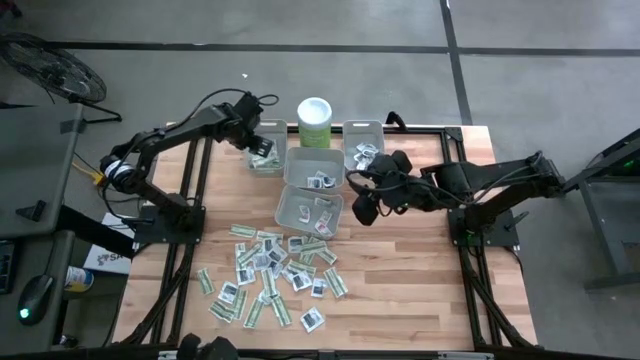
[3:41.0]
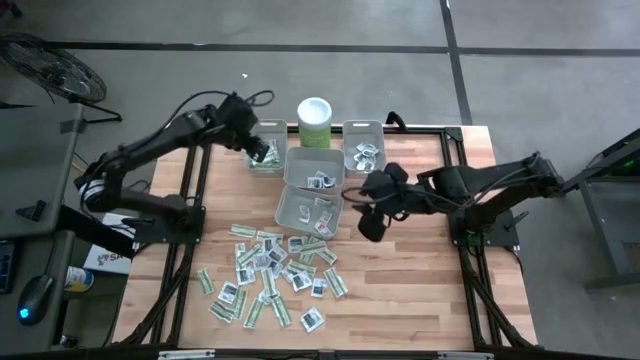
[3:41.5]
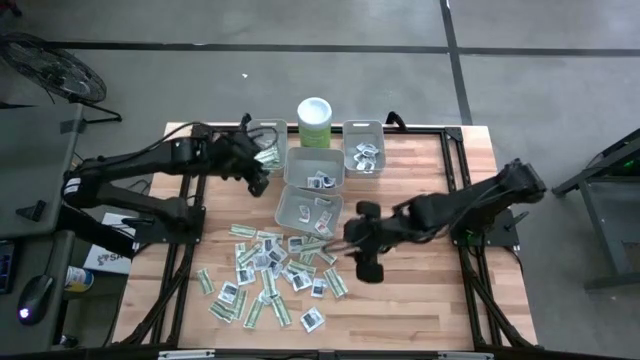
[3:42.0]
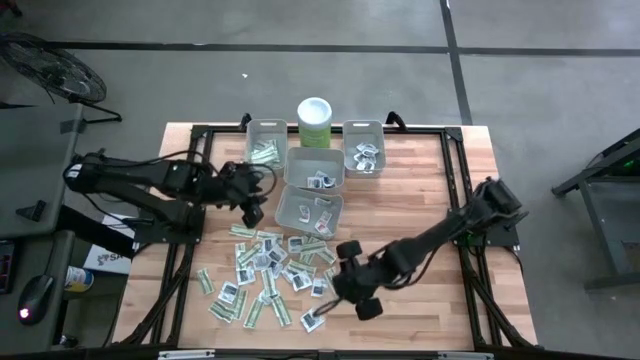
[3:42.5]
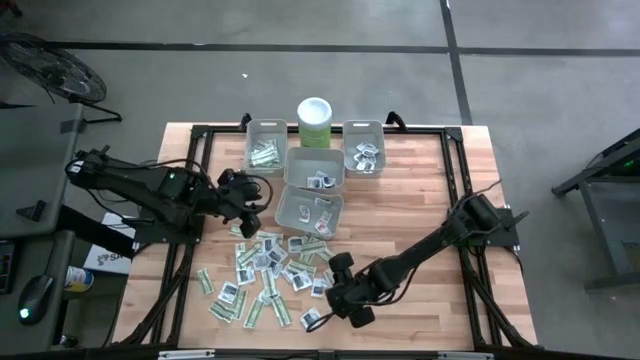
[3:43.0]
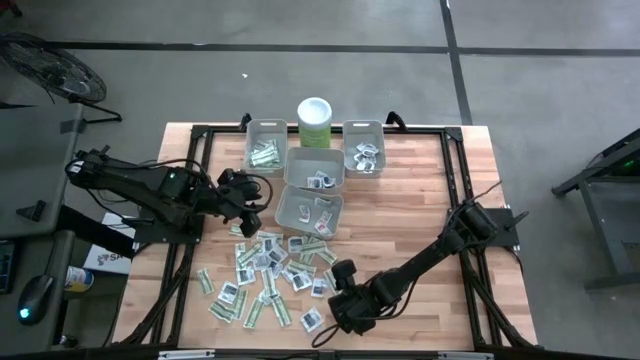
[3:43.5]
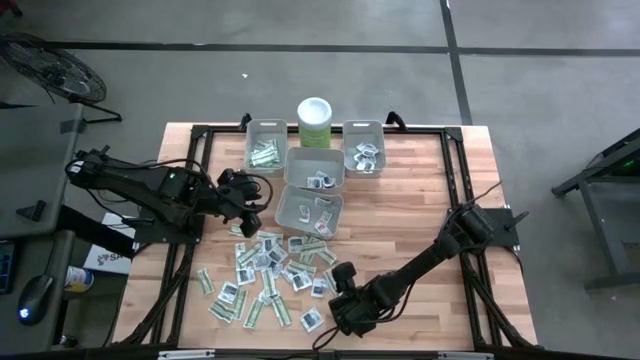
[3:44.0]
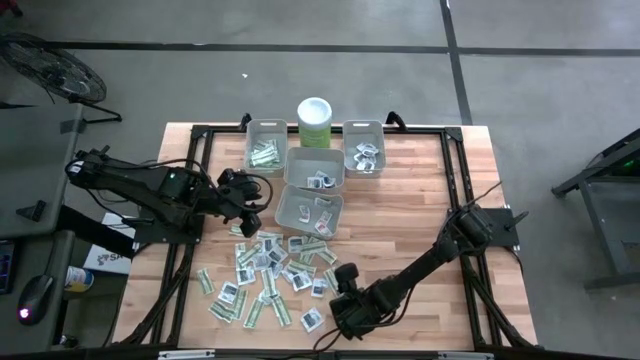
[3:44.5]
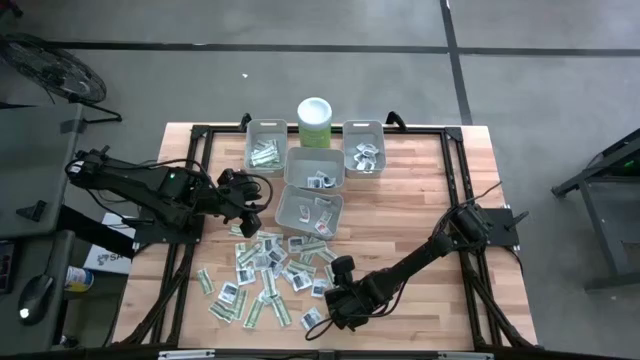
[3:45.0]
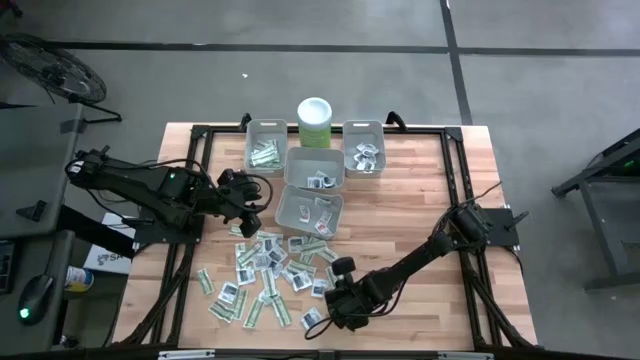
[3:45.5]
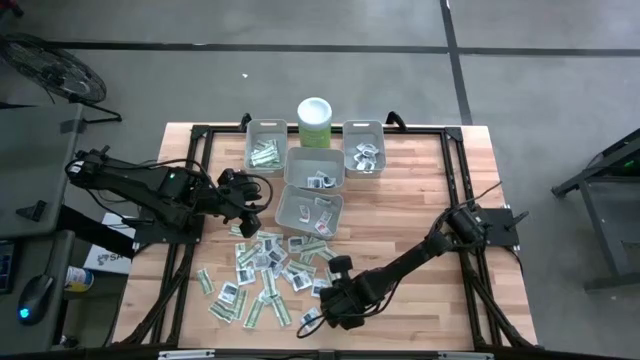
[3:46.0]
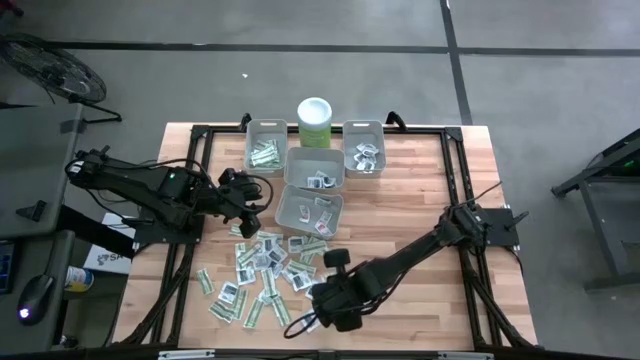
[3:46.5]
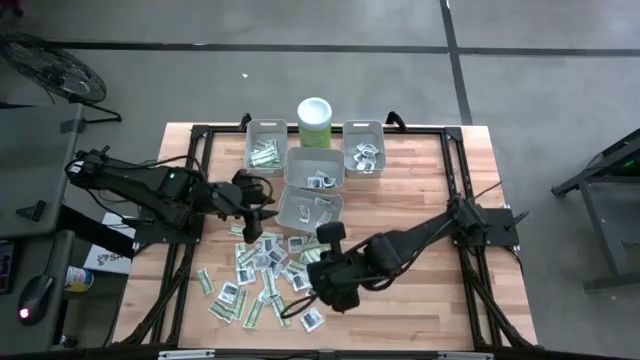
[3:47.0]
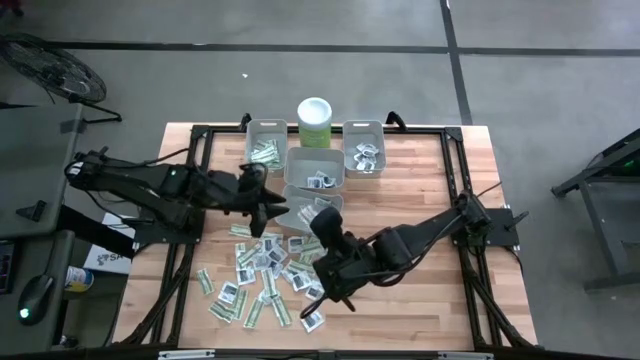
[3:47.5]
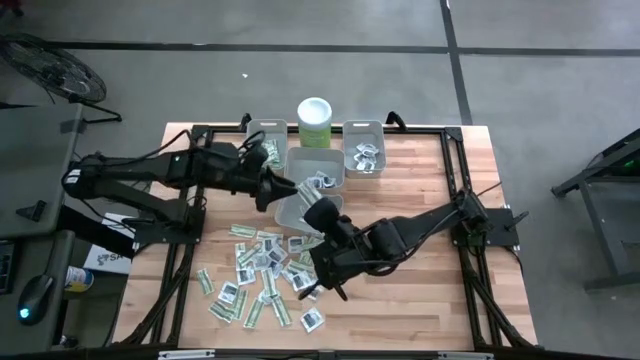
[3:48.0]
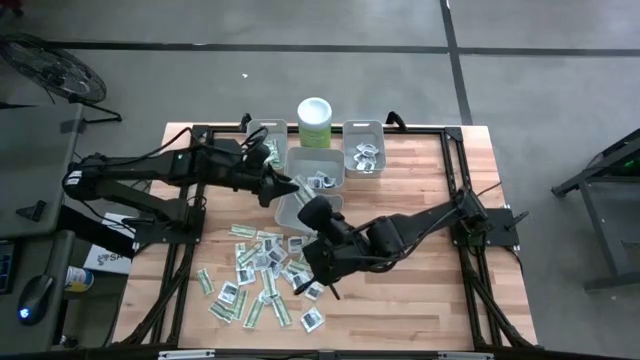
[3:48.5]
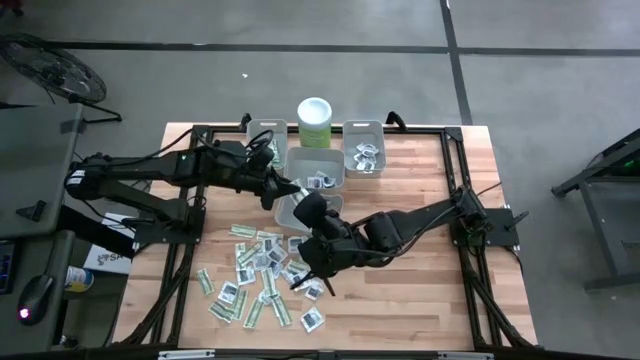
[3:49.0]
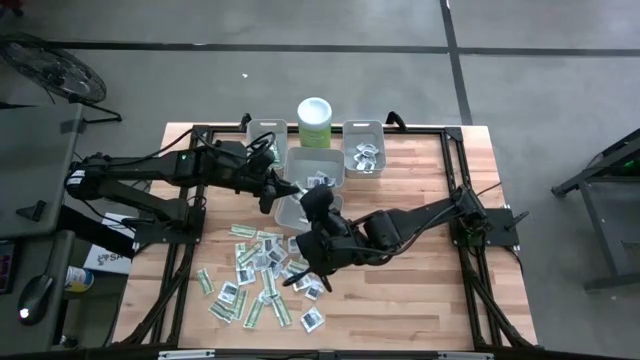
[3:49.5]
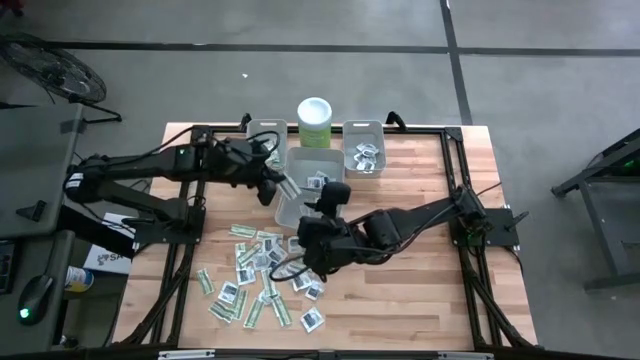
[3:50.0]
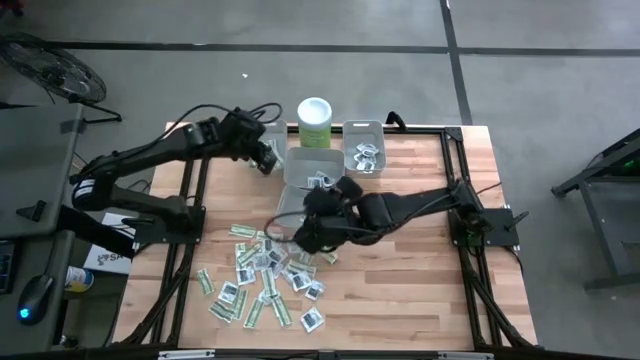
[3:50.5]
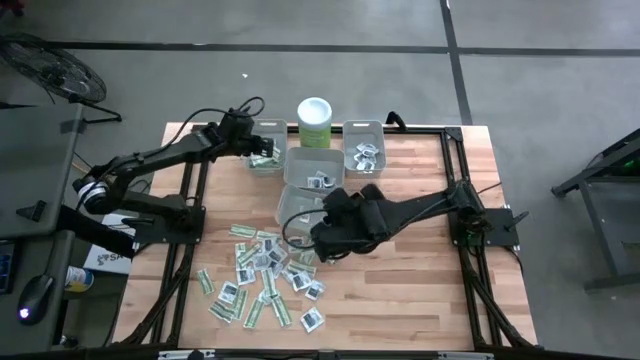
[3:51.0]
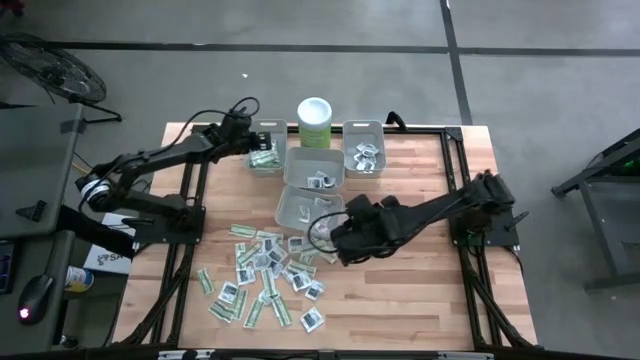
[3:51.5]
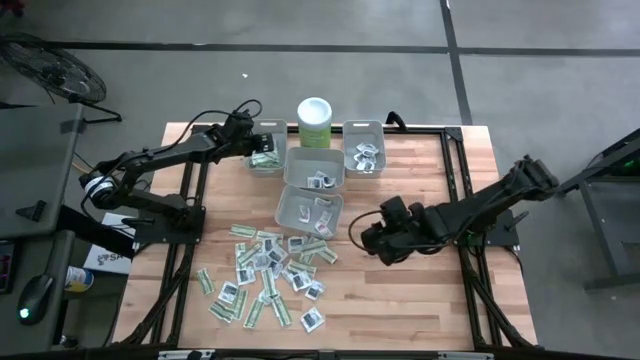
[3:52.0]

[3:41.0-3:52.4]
Task: Pick & Place First Aid Supplies
Put the bandage pack into the left bin

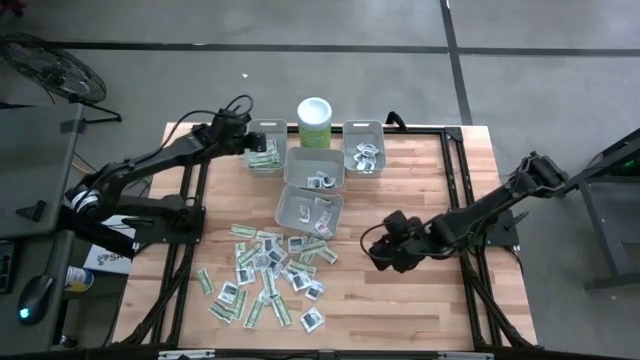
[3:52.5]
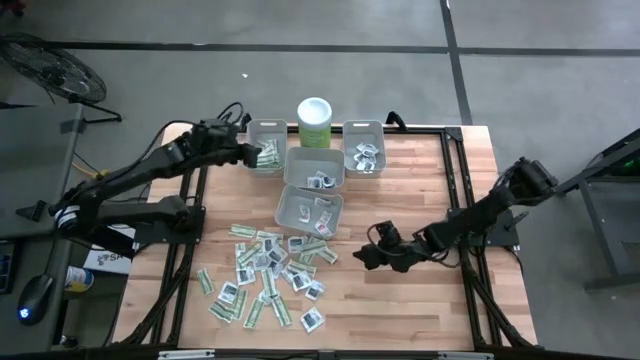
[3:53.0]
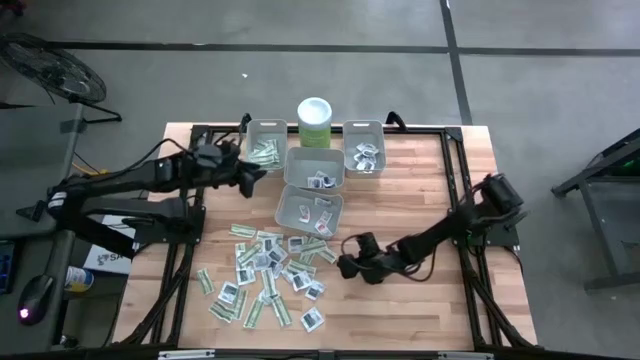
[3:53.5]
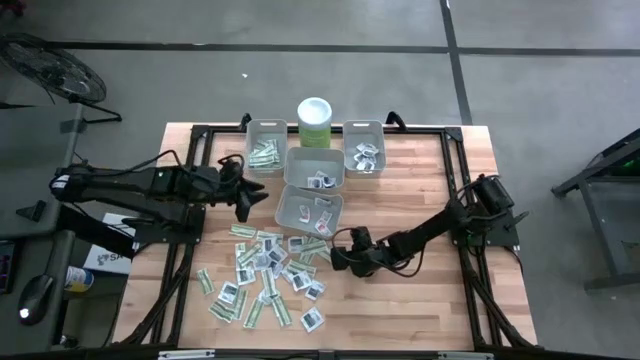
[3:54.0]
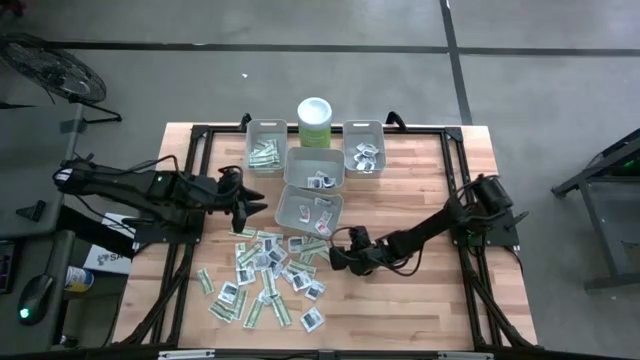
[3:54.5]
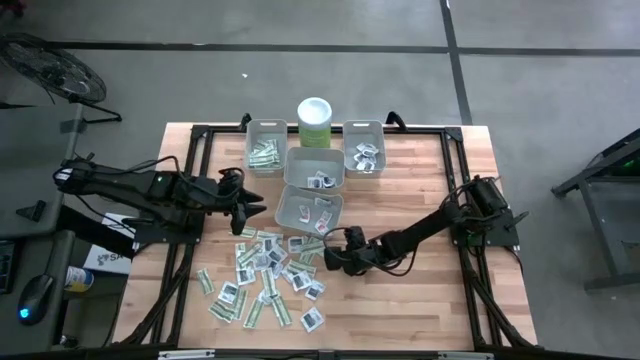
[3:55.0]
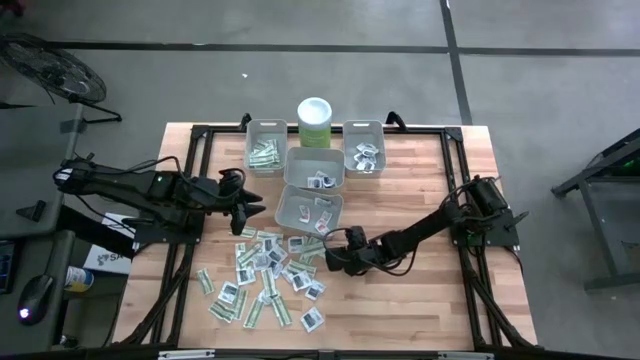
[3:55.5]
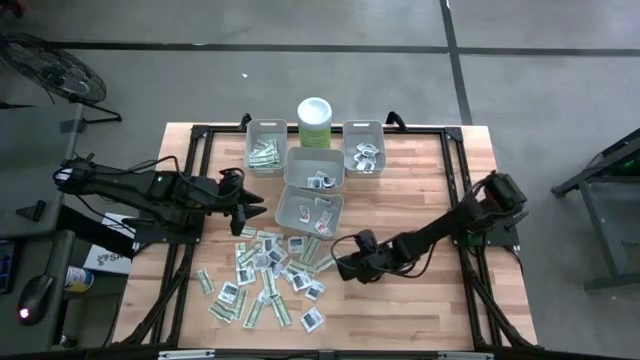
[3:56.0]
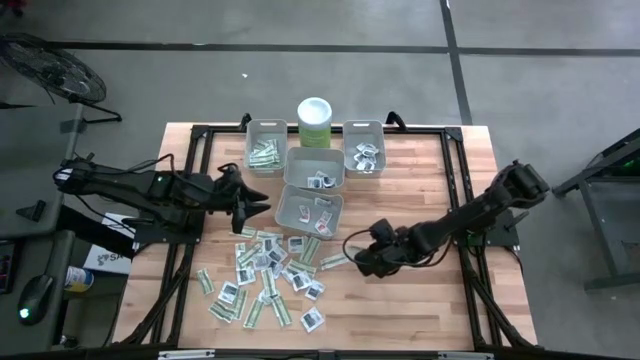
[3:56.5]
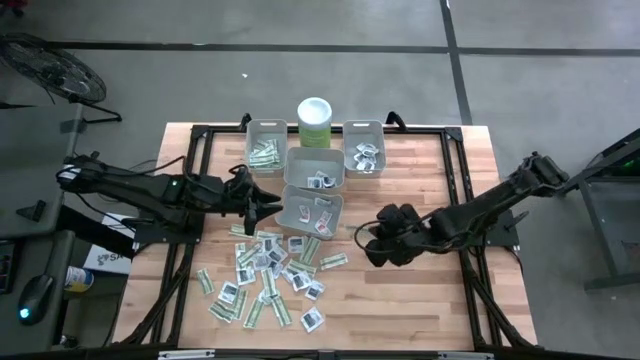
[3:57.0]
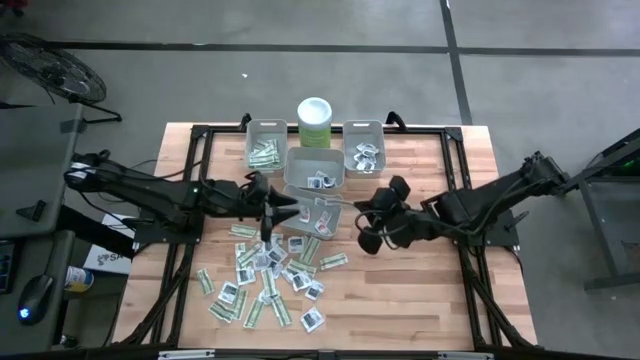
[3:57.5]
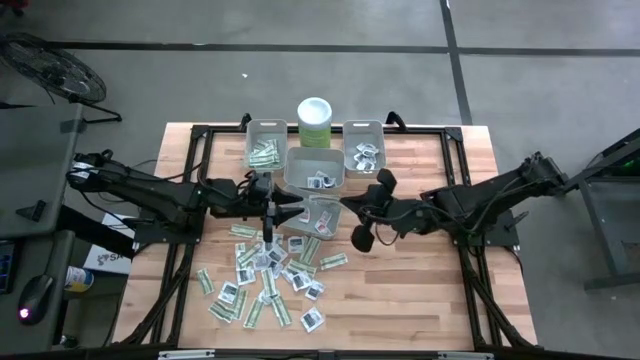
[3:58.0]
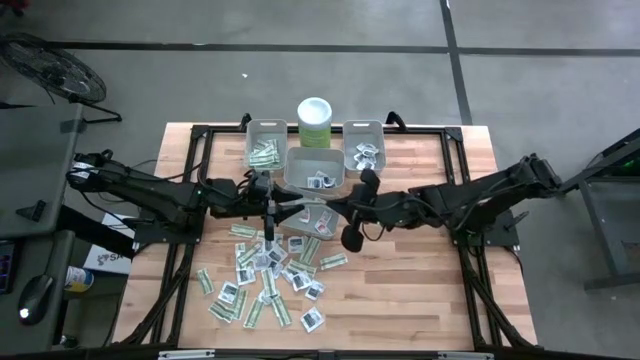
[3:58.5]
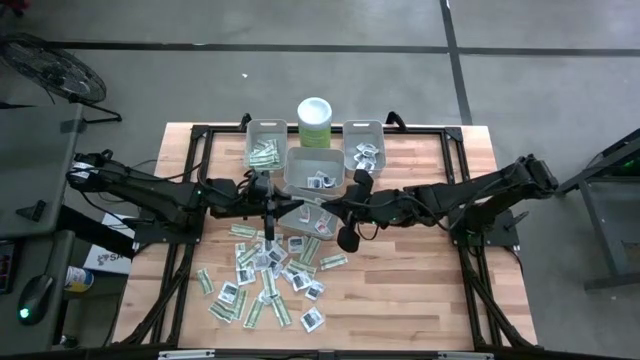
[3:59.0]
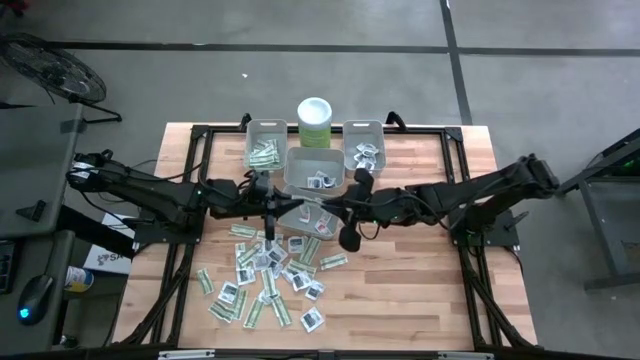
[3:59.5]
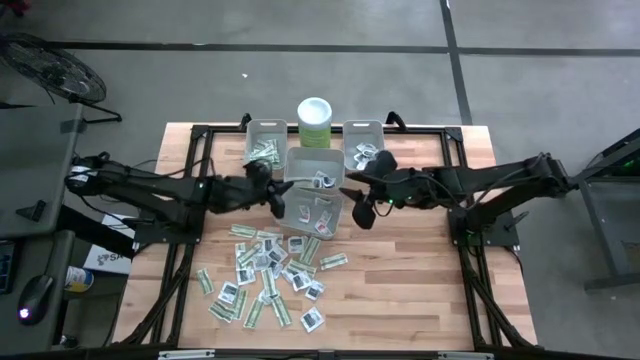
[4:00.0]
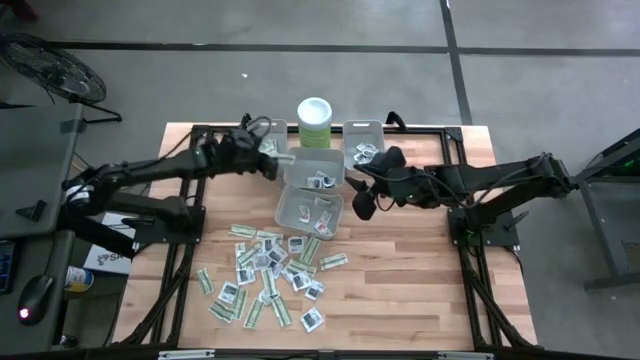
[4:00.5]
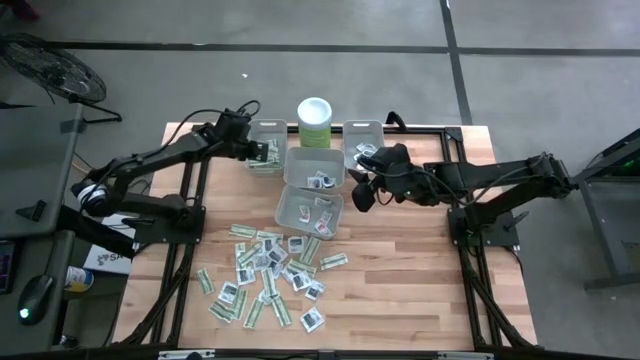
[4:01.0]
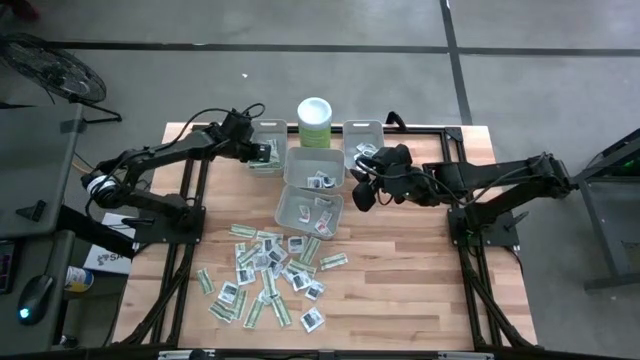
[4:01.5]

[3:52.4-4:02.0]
Put the bandage pack into the left bin
